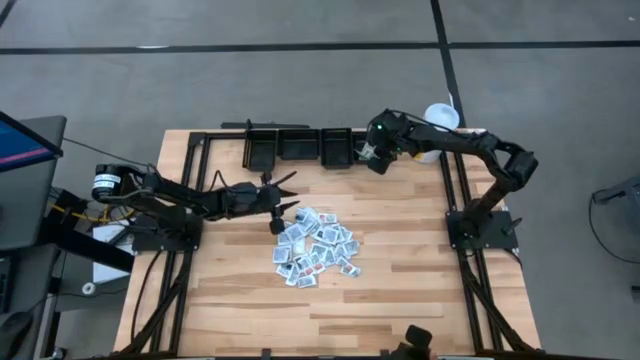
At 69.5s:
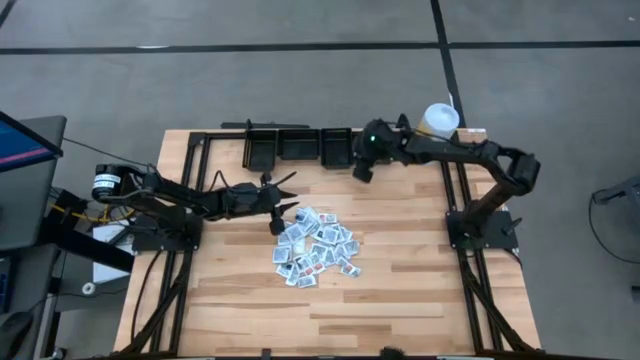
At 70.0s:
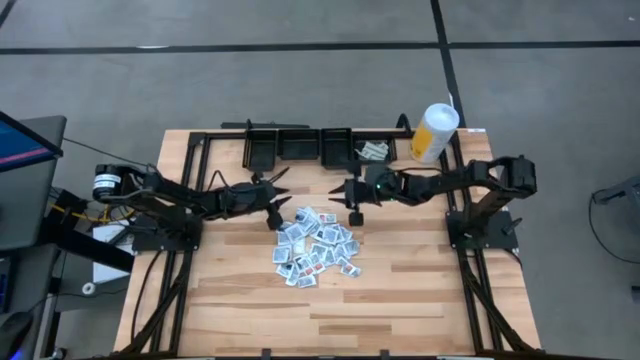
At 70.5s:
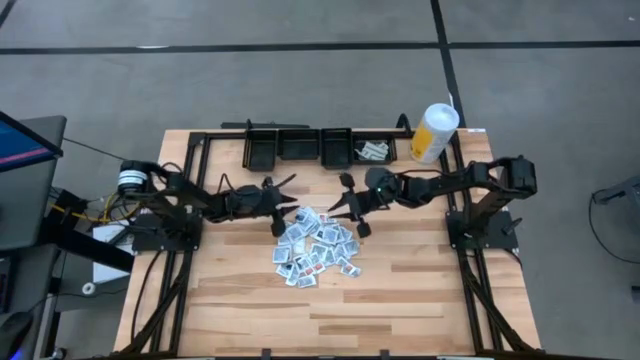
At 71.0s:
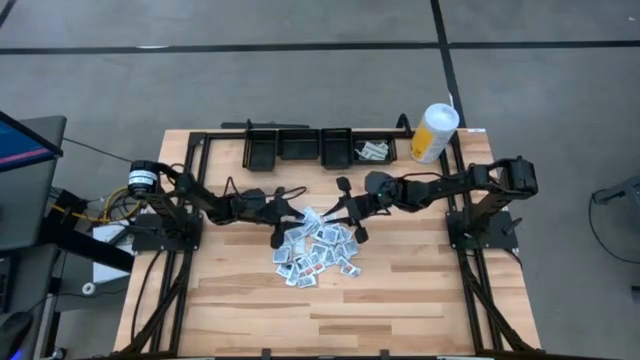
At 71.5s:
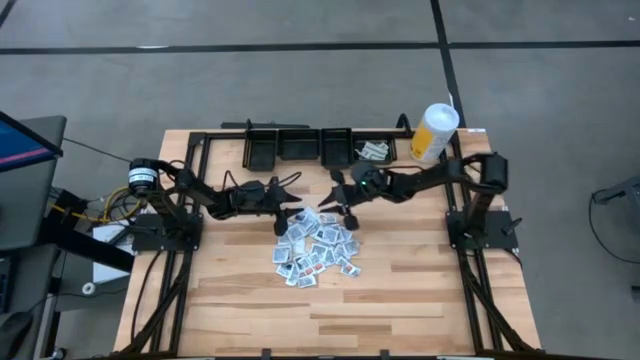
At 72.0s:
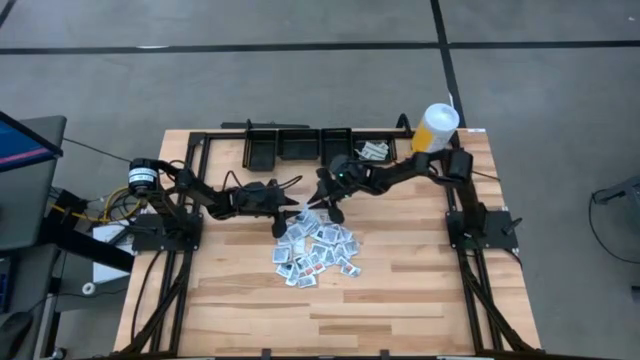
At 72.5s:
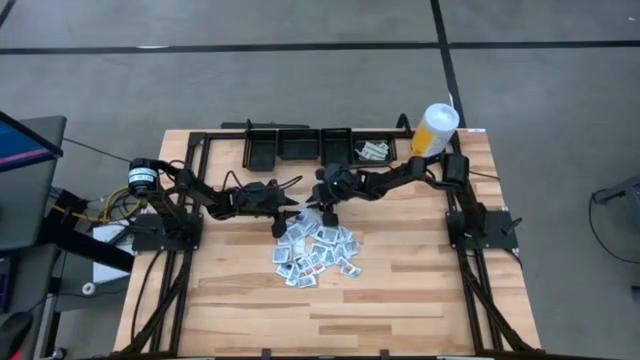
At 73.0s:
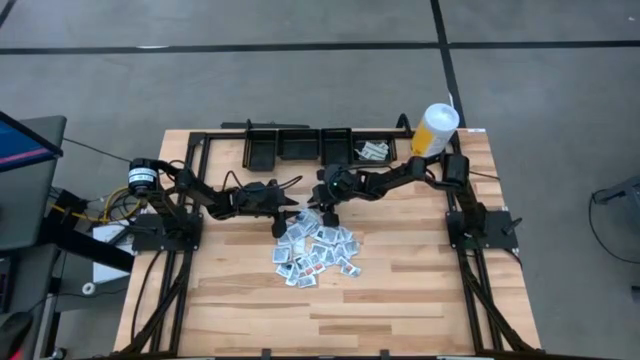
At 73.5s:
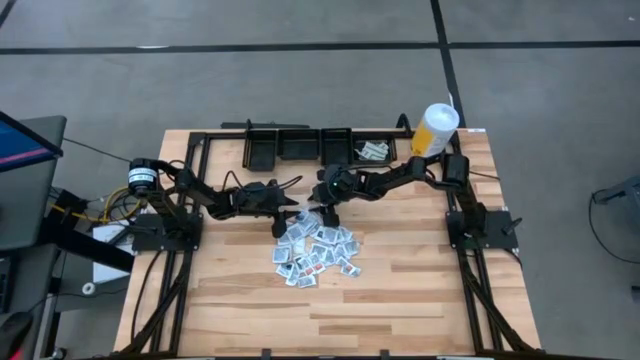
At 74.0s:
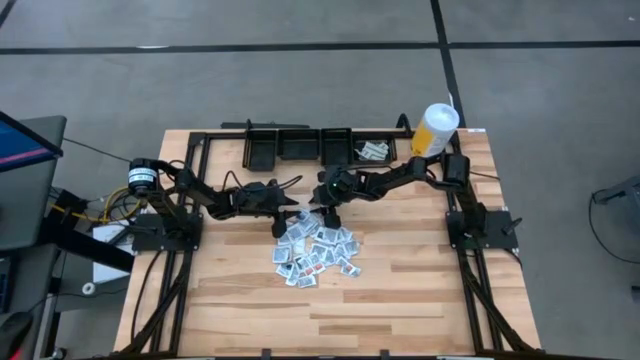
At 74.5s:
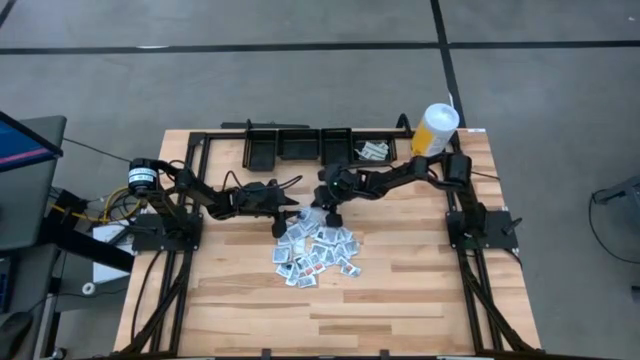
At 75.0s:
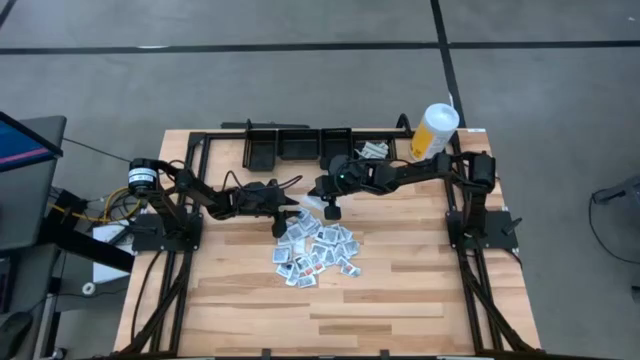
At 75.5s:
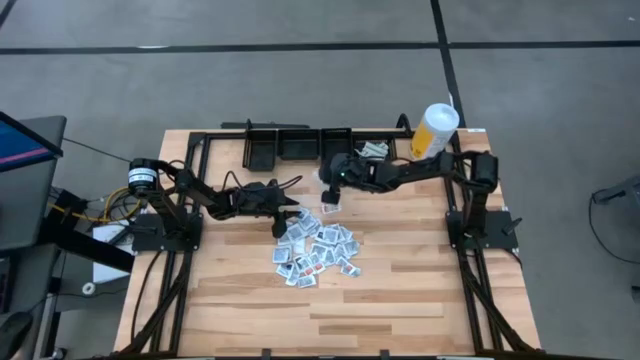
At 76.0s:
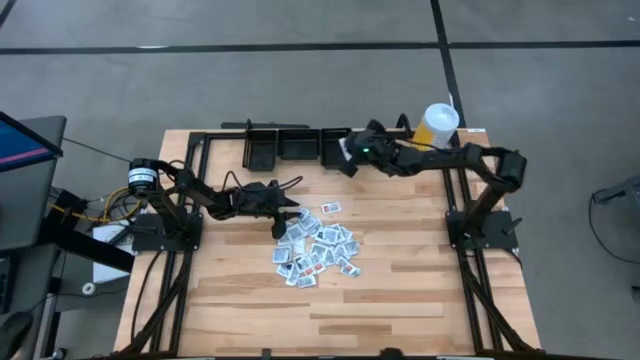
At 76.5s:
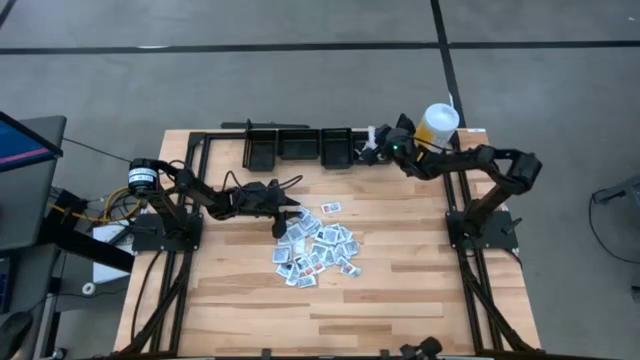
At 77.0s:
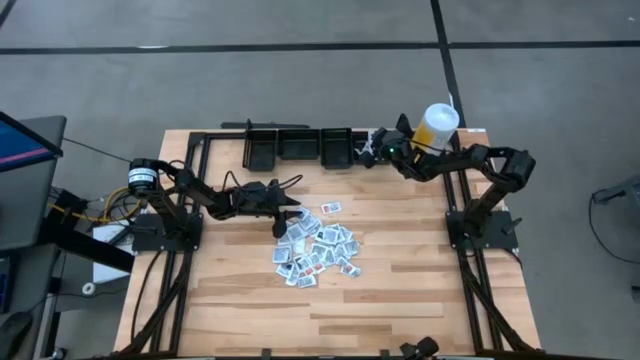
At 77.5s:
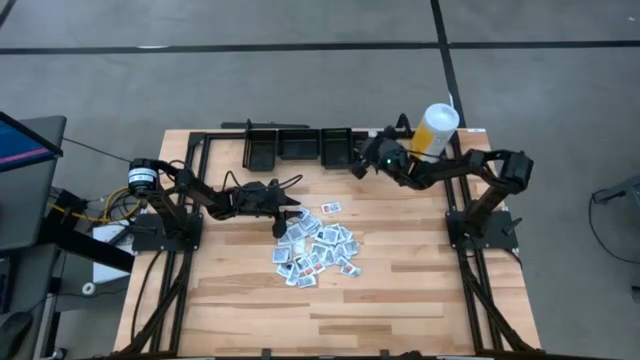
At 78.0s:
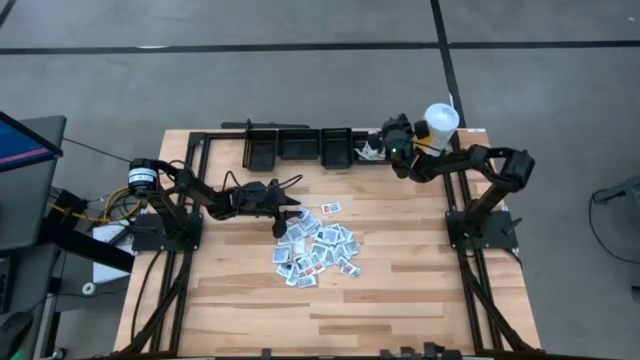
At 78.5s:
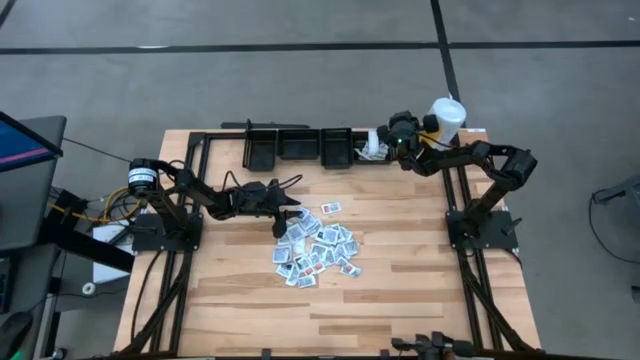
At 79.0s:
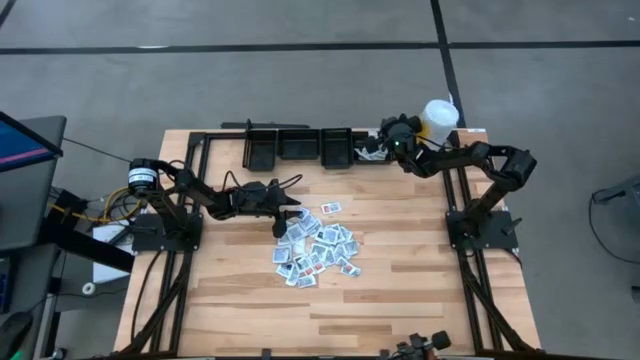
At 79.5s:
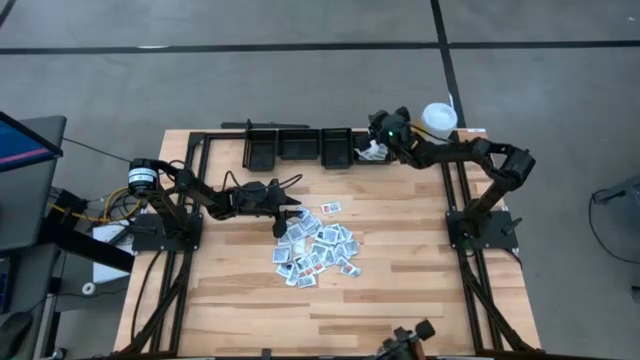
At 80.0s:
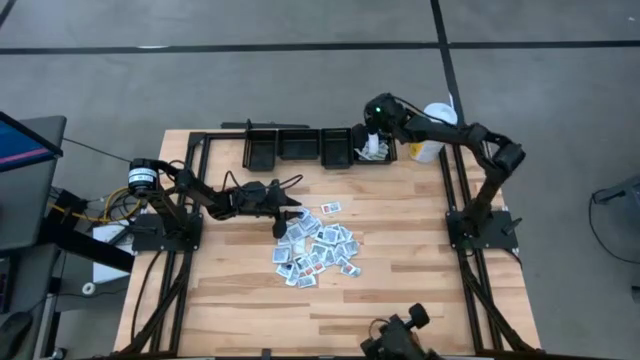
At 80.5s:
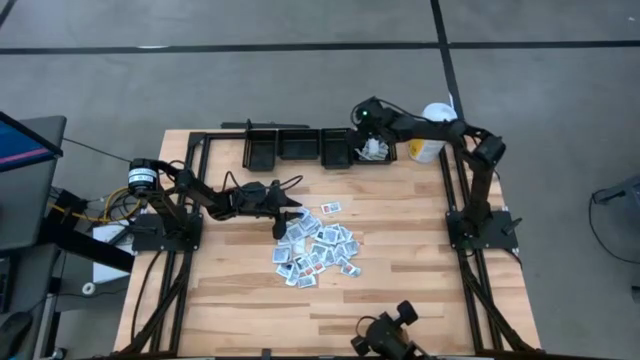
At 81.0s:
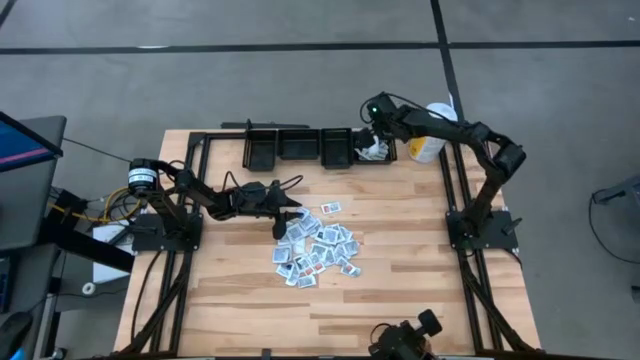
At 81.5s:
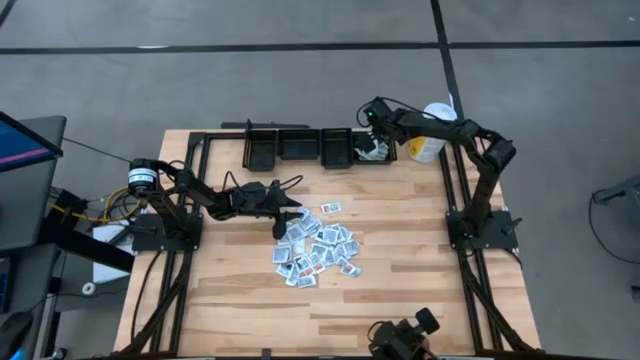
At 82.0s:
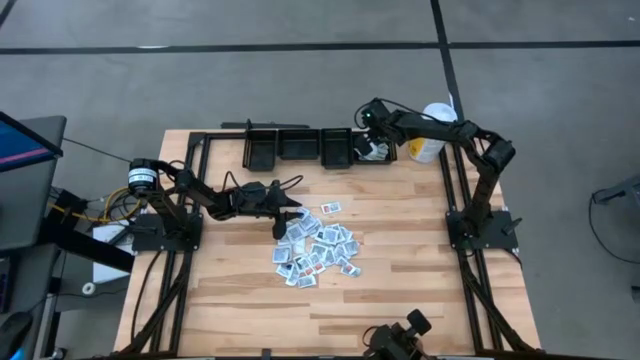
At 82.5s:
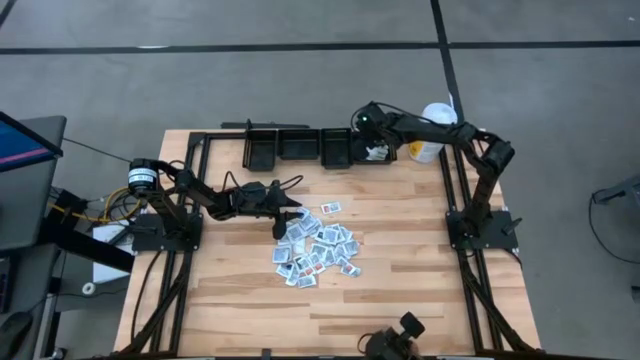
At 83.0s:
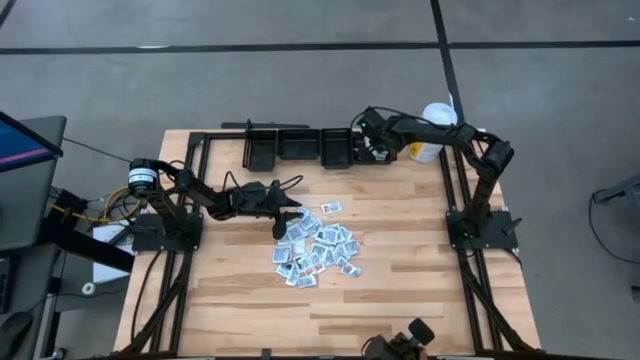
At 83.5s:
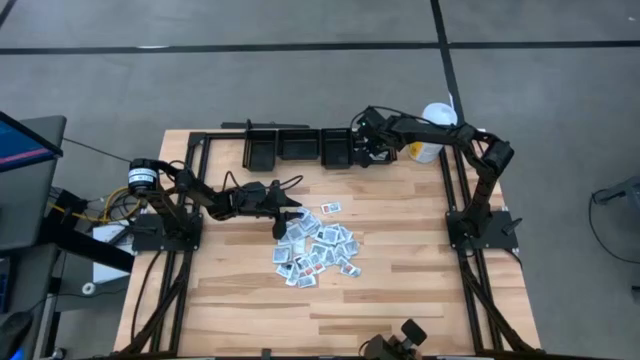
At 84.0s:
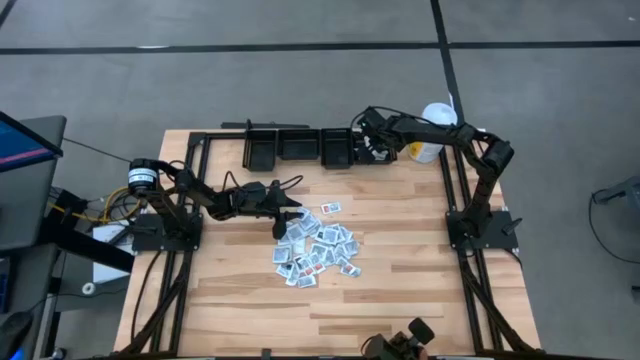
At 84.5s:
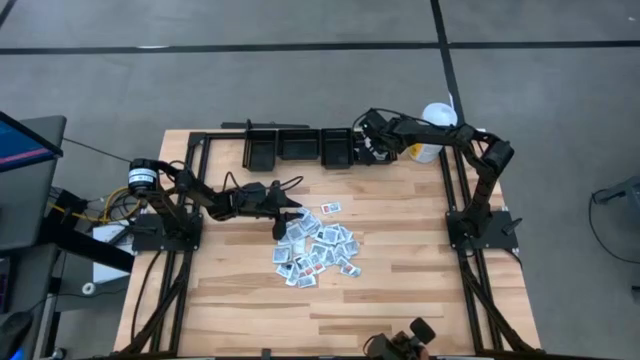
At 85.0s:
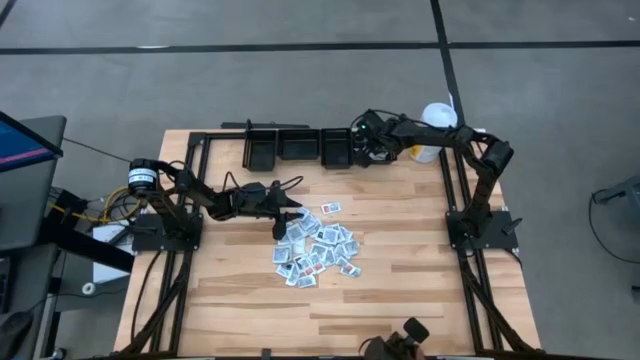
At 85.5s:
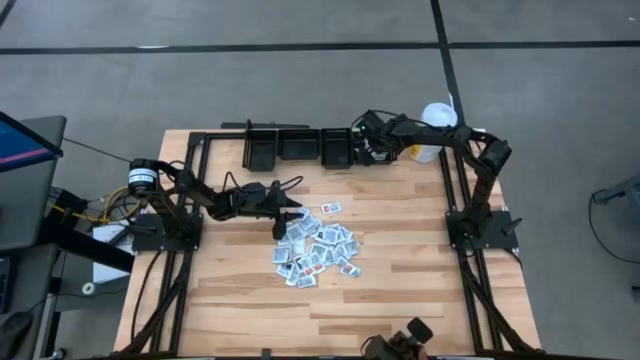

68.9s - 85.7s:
Task: Pick & Place First Aid Supplies
Put the green bandage pack into the right black bin

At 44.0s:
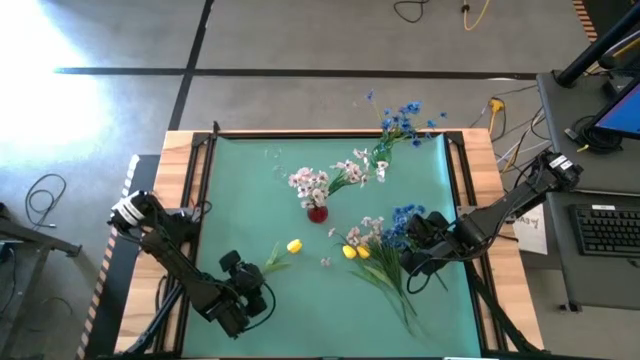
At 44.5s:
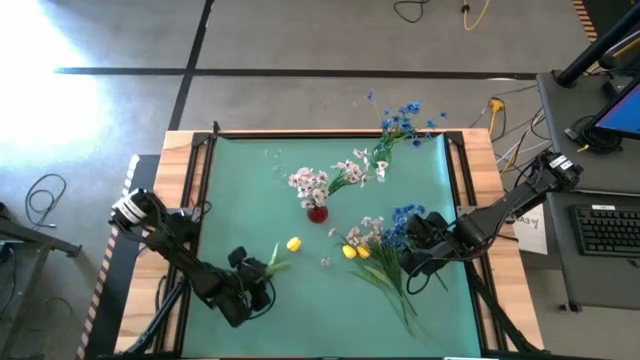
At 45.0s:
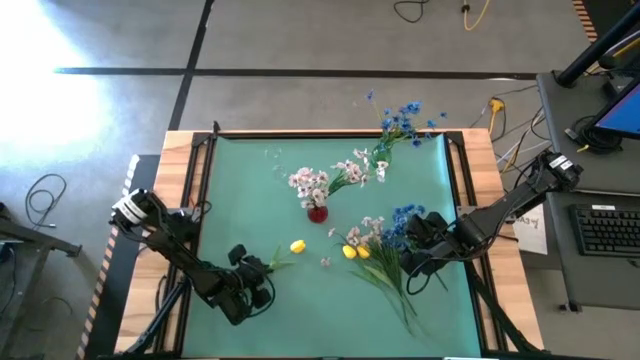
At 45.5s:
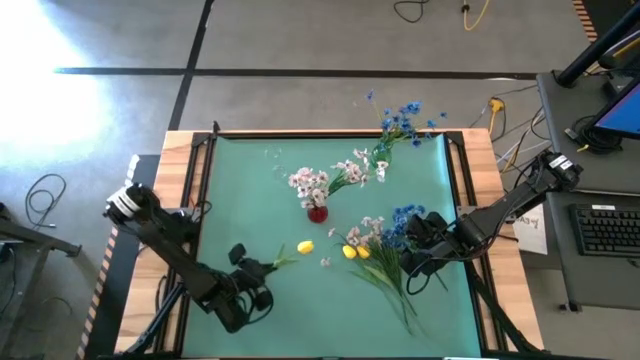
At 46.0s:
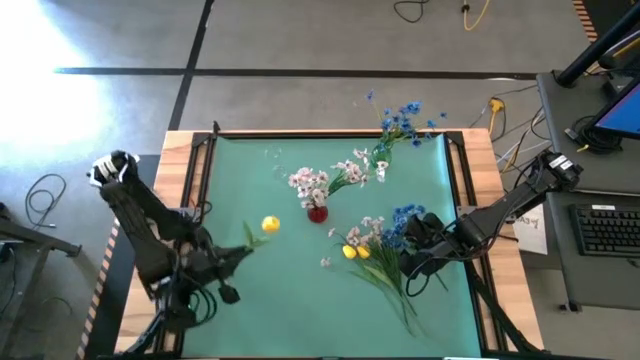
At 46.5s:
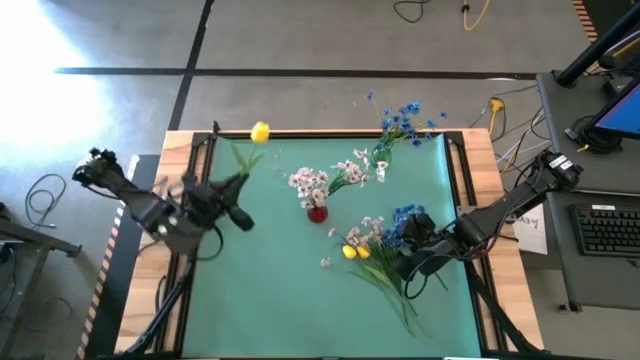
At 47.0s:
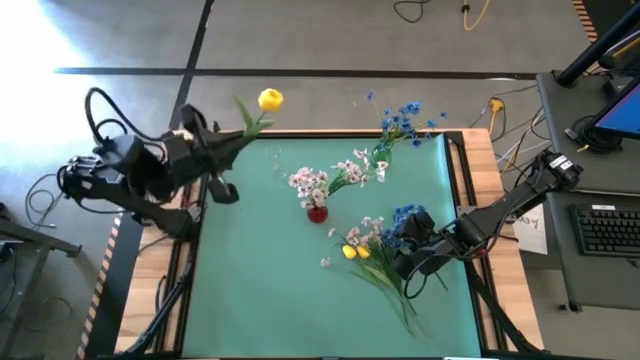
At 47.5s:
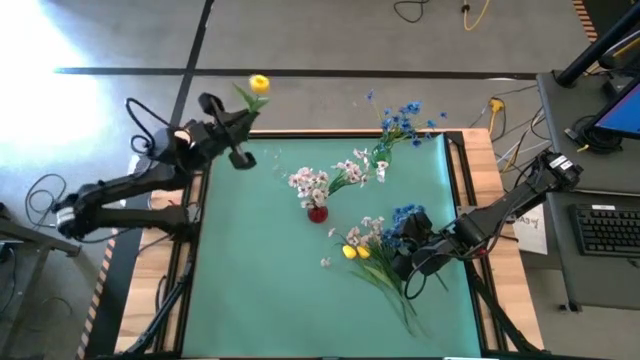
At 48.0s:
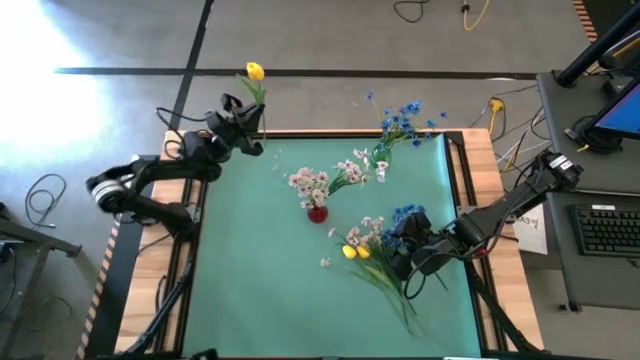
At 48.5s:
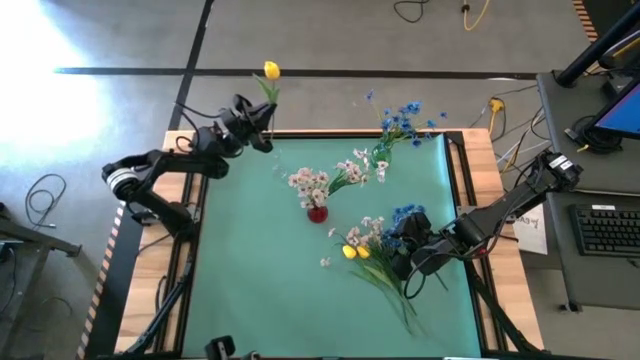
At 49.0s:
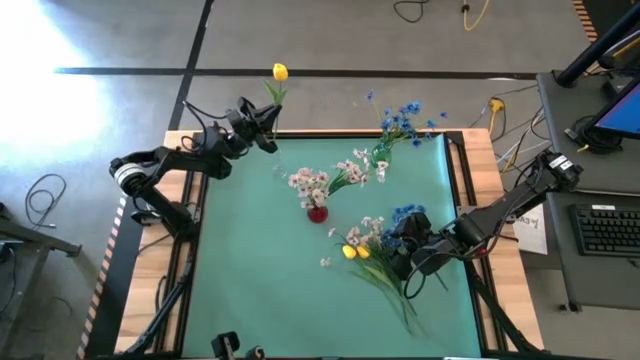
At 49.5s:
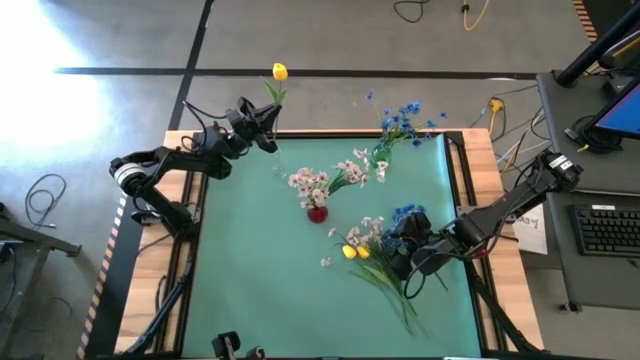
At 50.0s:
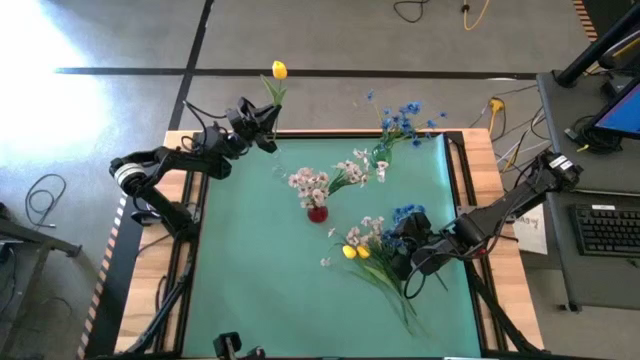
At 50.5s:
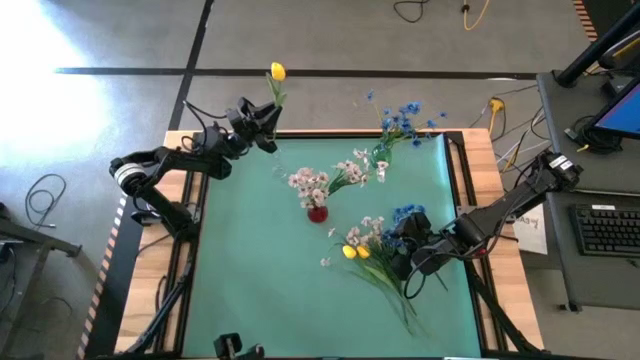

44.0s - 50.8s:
Task: Sort flowers into vase by color
Put the yellow tulip into the transparent vase
